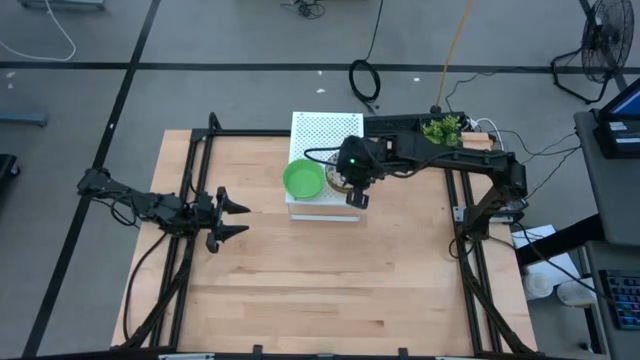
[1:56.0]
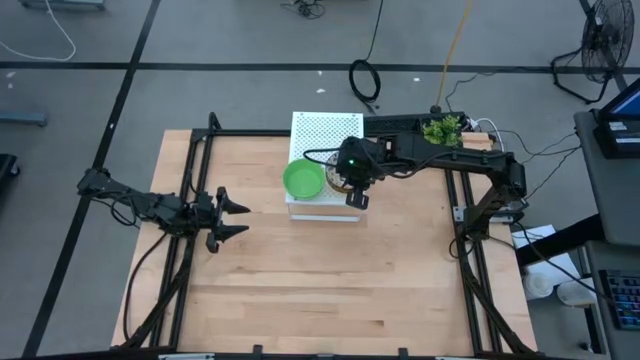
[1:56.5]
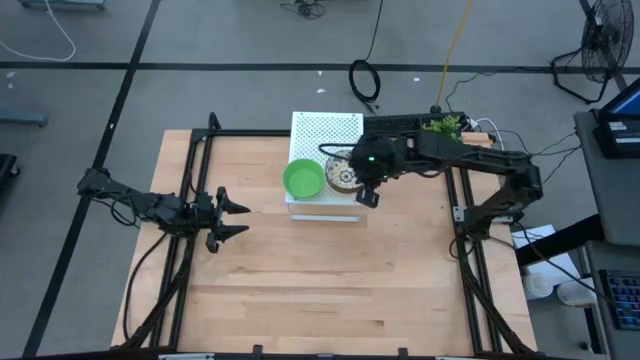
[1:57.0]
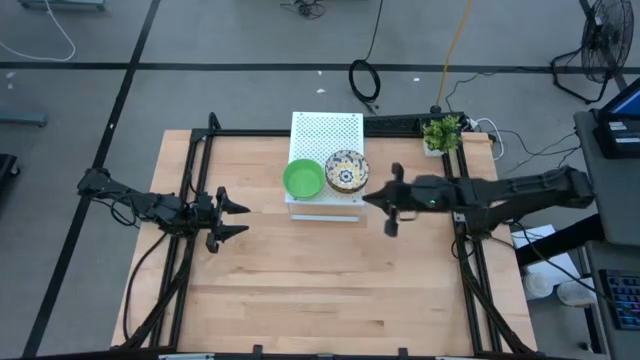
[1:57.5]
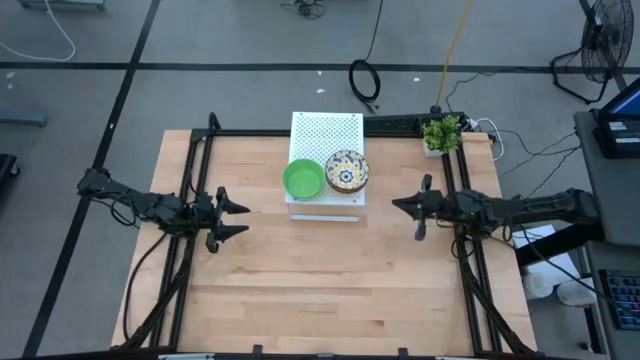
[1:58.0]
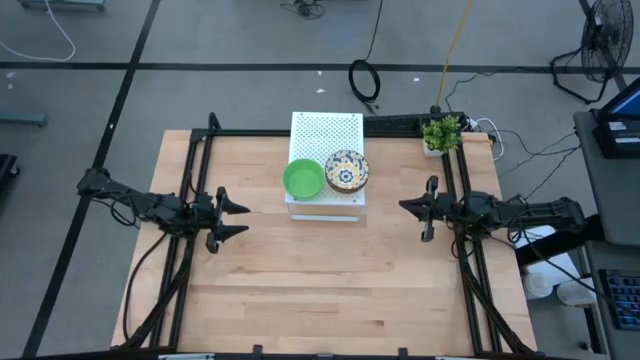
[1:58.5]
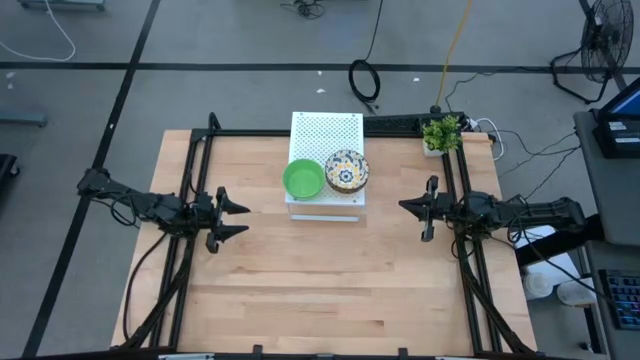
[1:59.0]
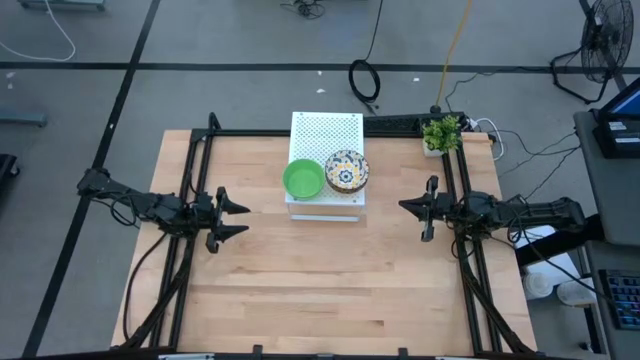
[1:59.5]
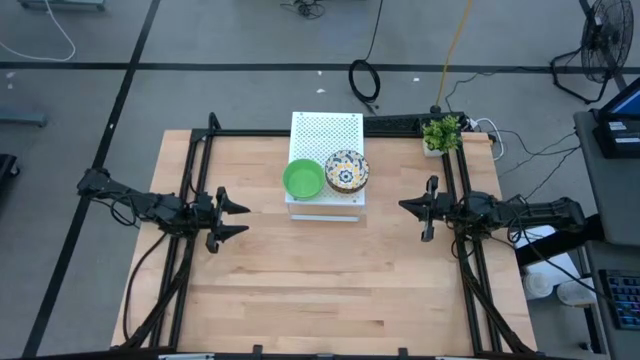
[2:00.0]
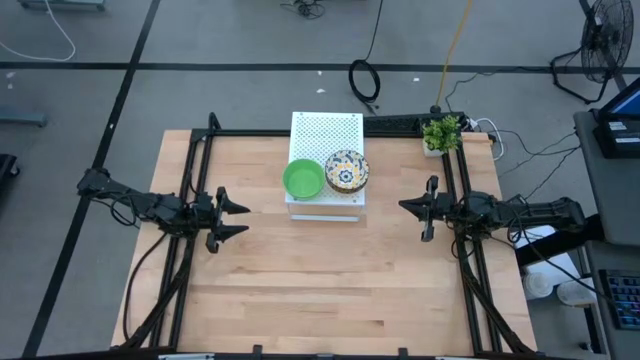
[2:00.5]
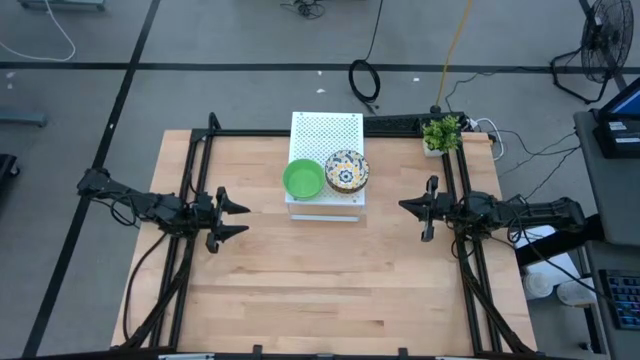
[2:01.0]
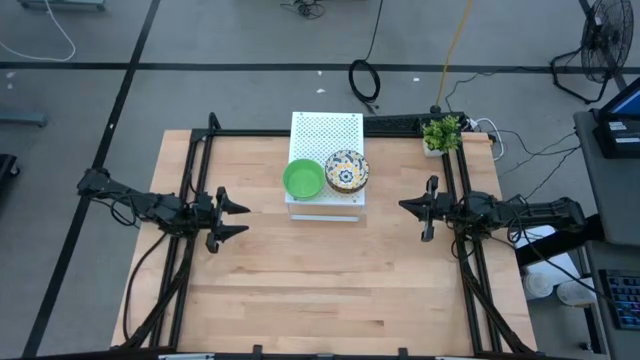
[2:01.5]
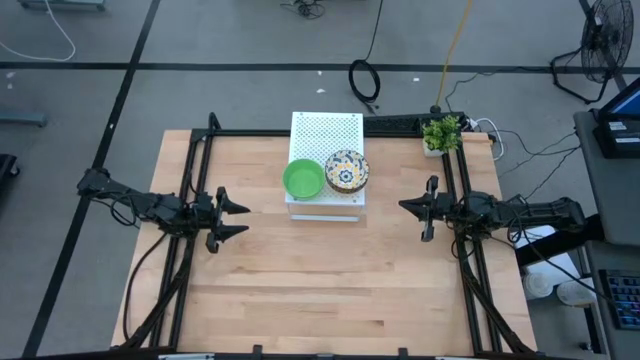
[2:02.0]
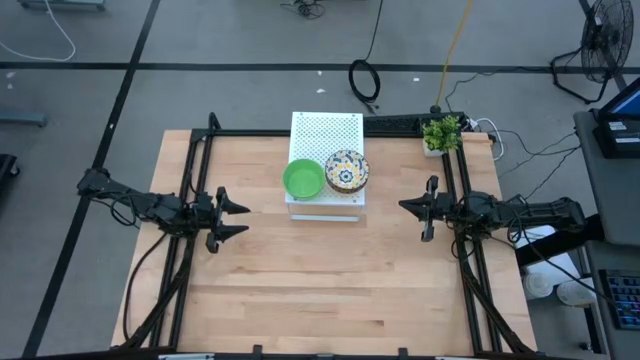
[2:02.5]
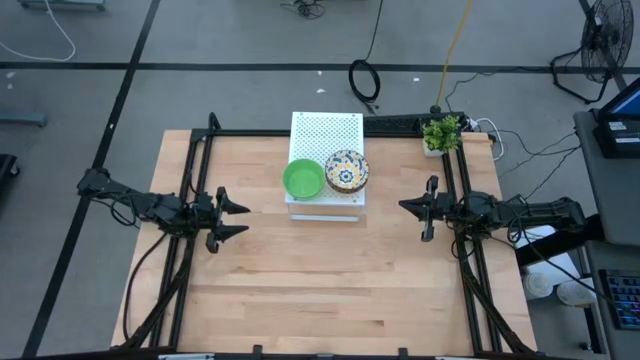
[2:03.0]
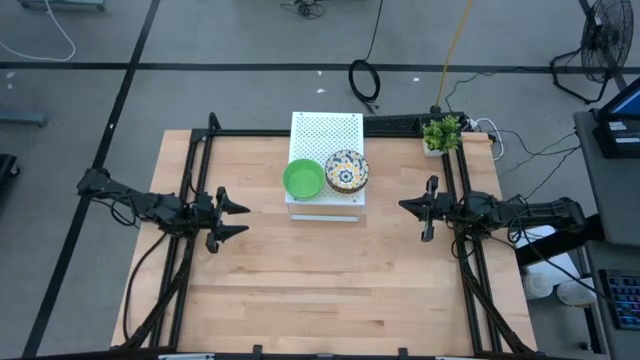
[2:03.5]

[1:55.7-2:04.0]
Task: Pick & Place Mini bowls
Return to home position

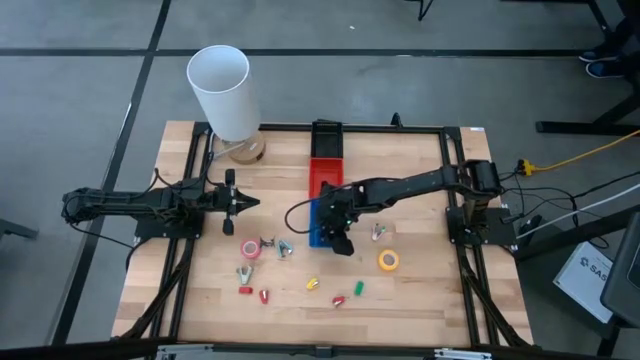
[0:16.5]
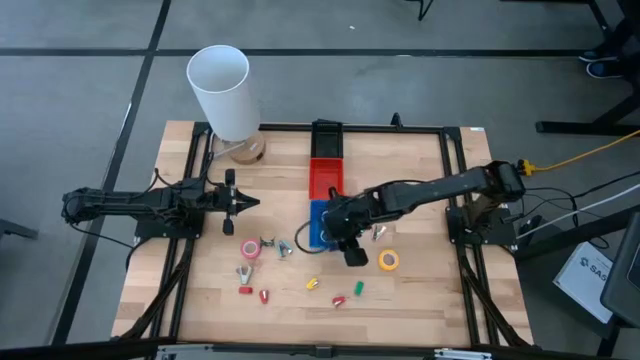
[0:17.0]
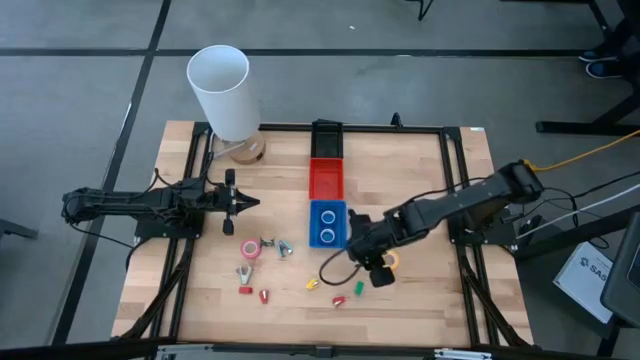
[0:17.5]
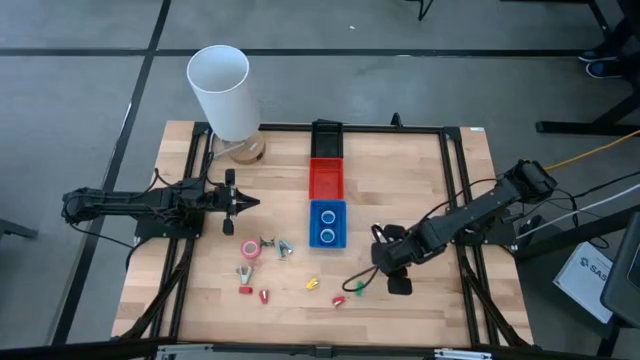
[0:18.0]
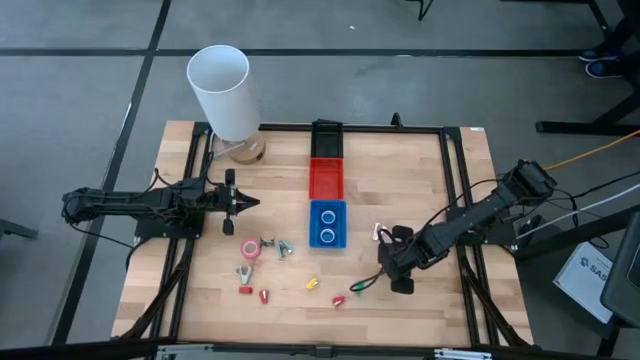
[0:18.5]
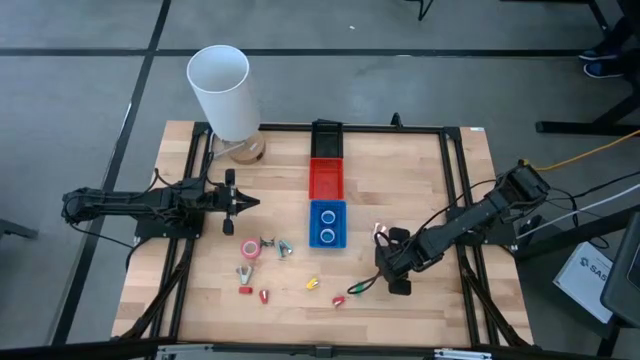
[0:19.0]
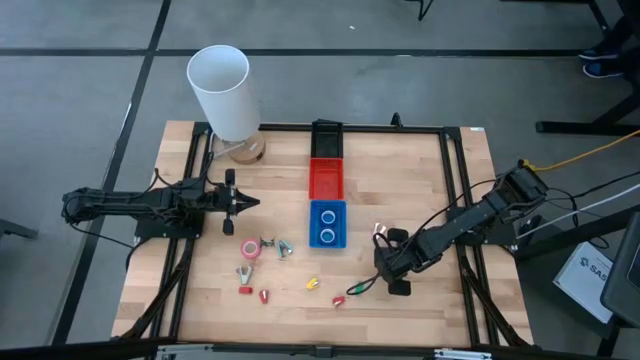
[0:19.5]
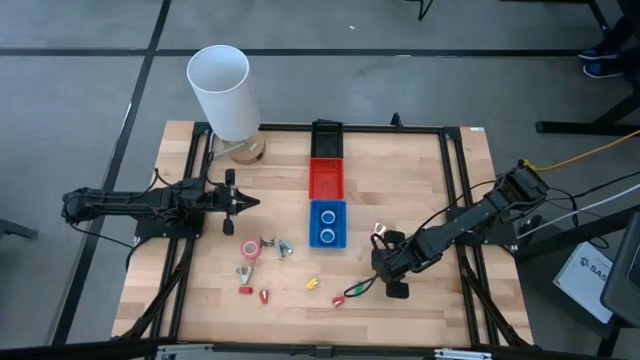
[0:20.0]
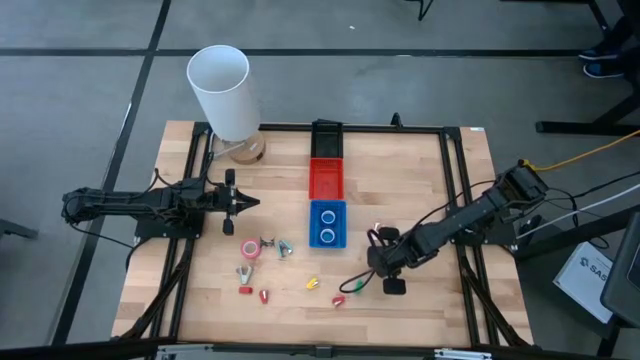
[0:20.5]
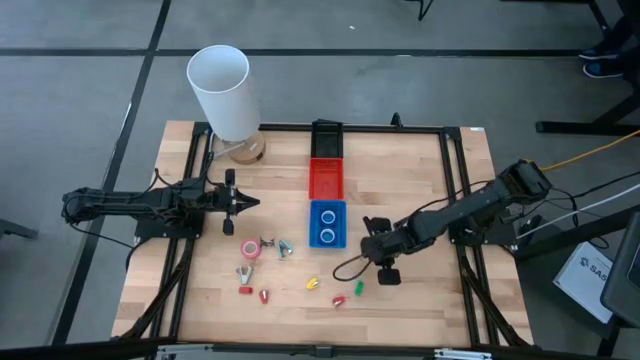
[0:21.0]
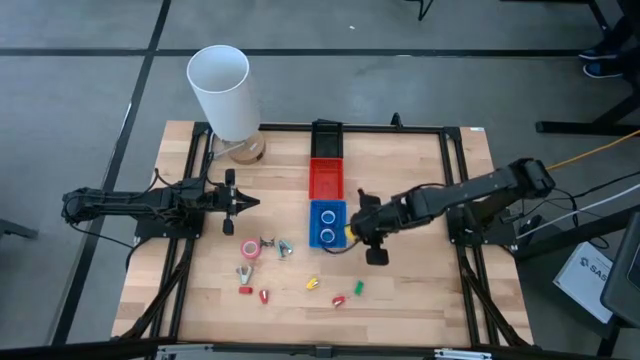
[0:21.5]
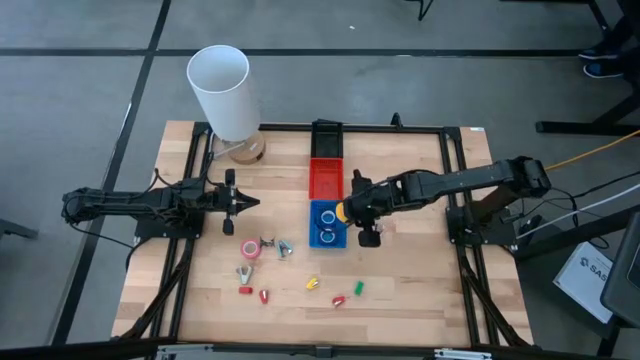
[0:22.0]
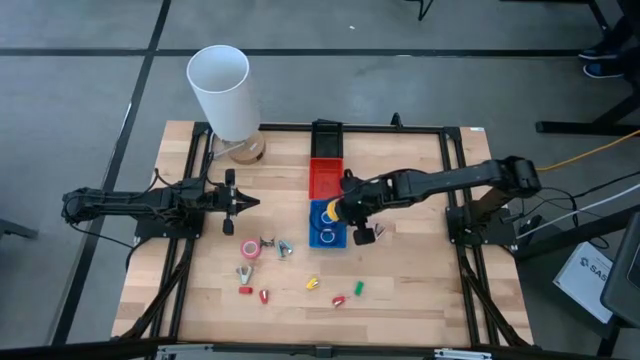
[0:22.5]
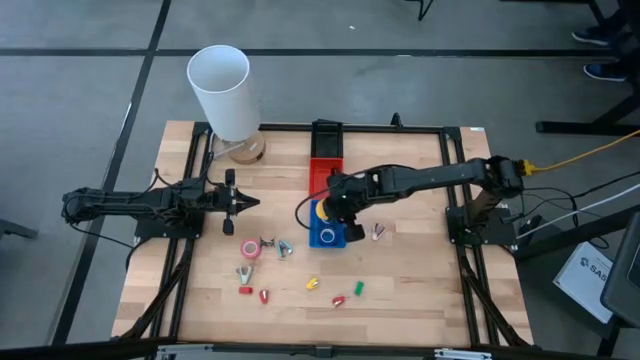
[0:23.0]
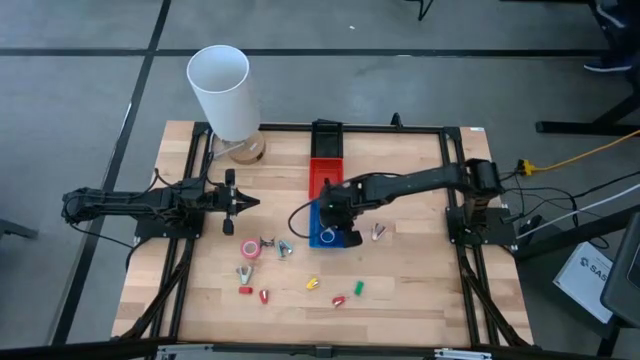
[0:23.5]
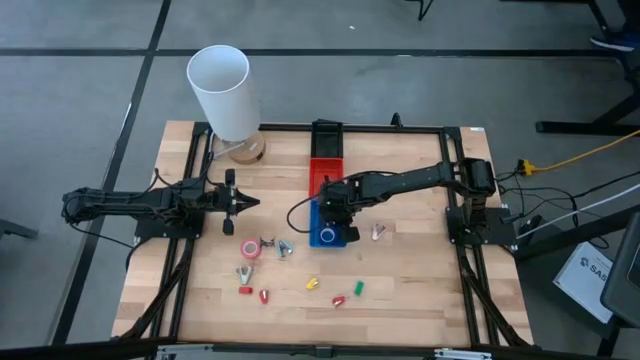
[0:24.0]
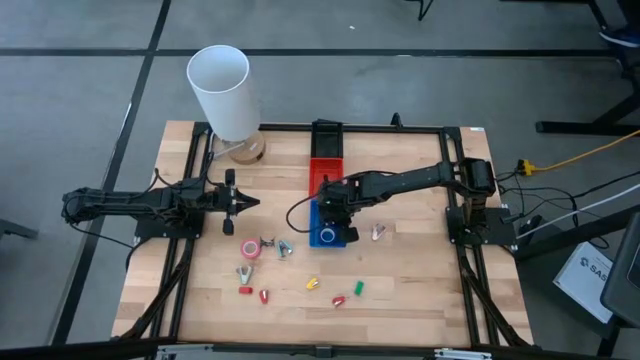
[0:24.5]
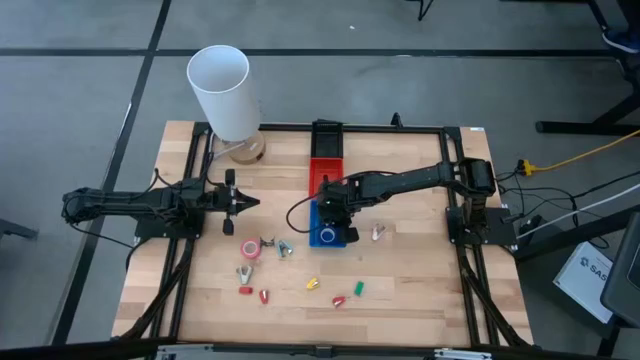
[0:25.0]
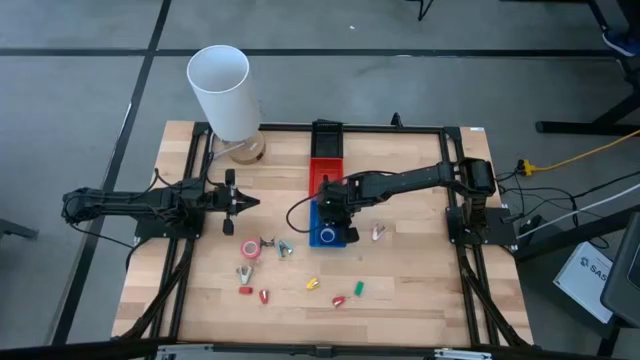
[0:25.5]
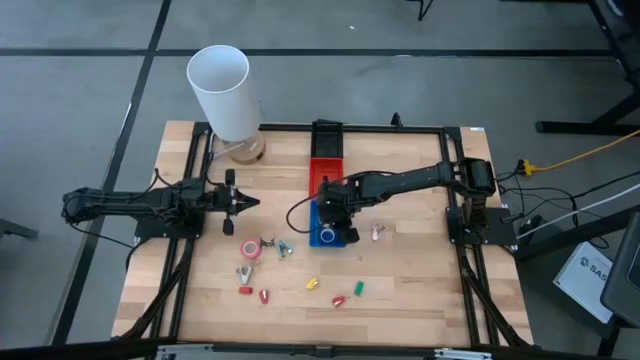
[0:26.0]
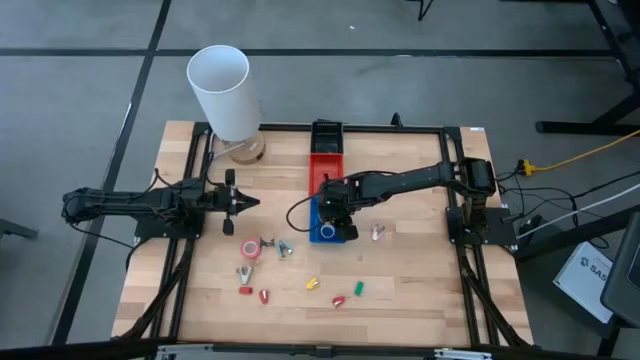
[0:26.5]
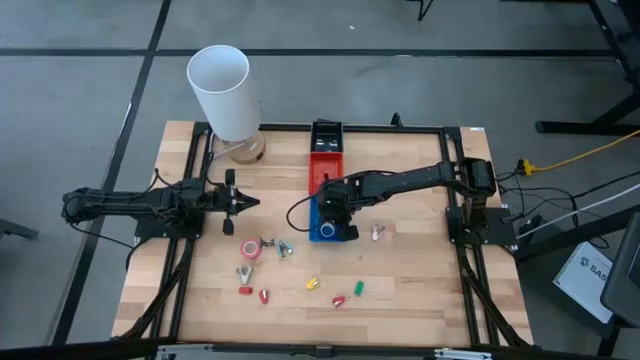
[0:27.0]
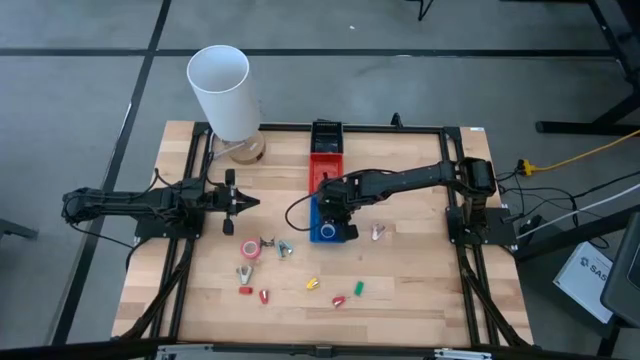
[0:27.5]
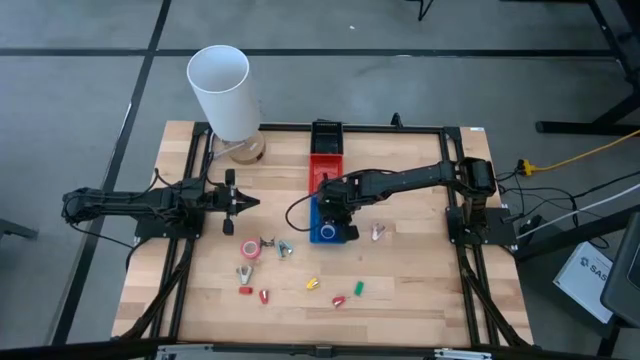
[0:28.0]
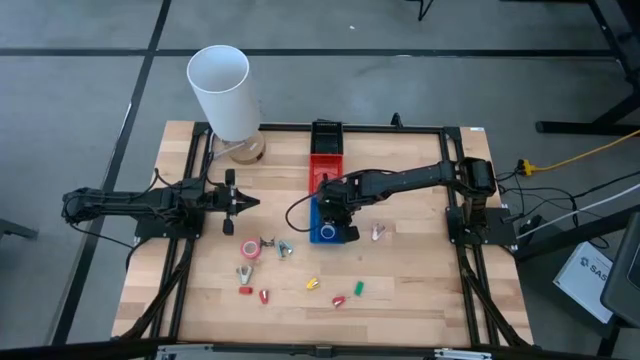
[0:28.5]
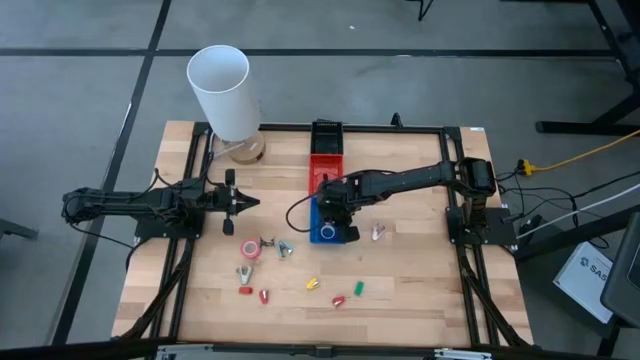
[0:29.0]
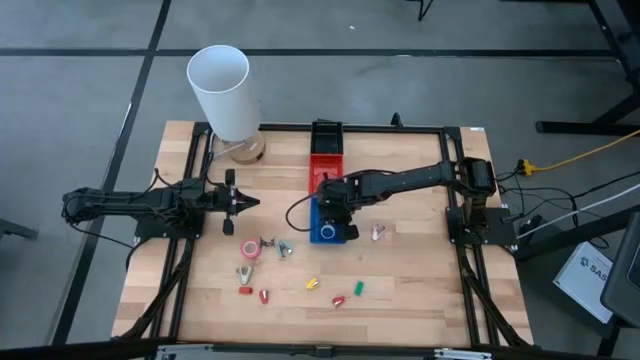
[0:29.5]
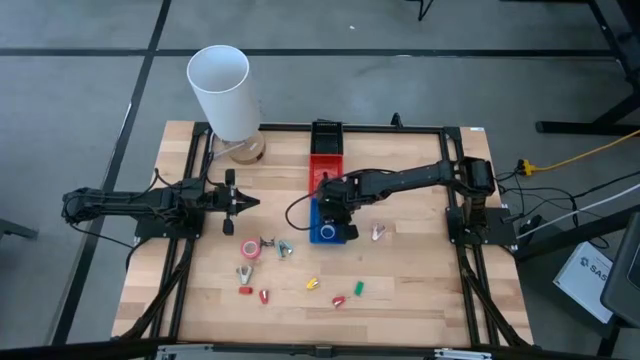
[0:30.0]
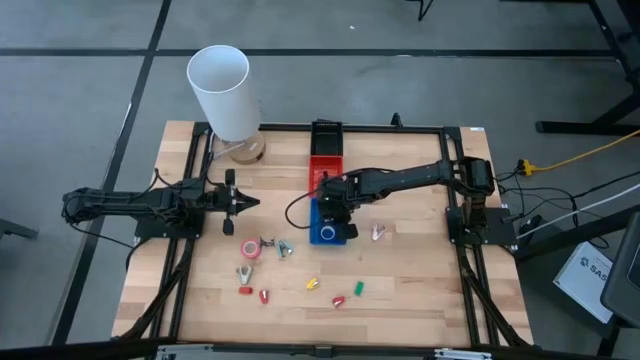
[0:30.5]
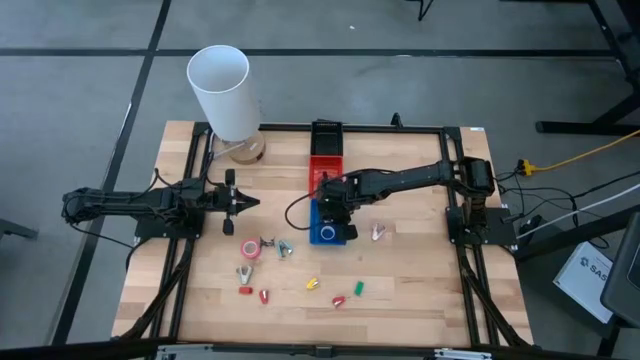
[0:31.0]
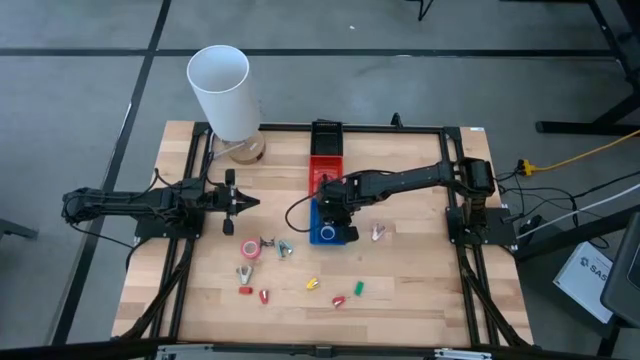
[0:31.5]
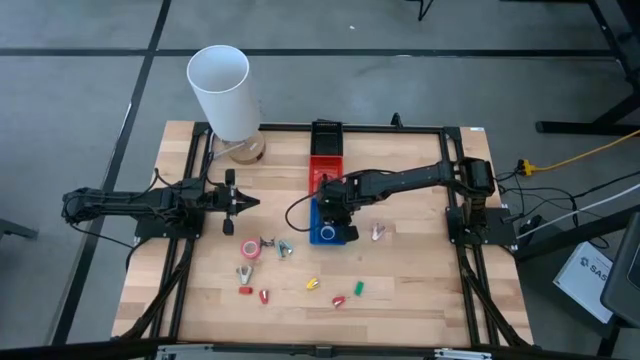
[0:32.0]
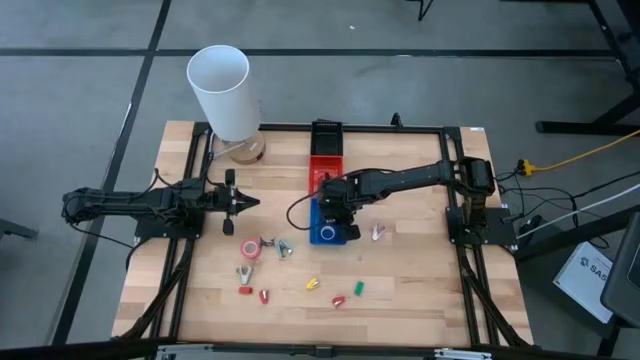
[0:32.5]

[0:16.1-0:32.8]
Task: Pick and place Stapler, Stapler remover, tape
Put the yellow tape into the blue bin
